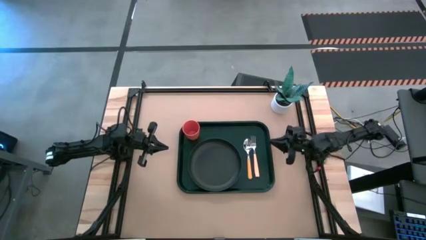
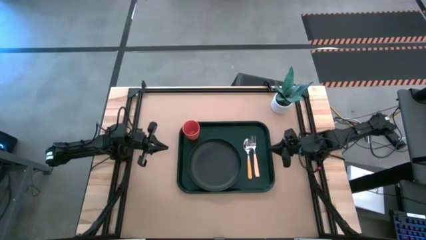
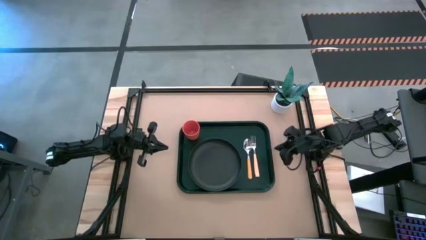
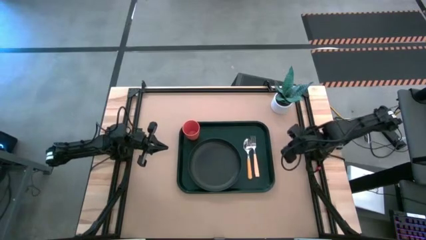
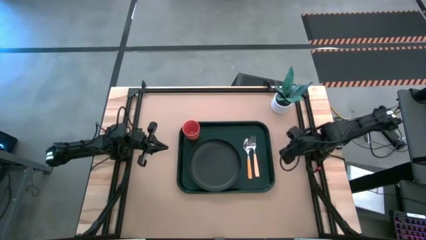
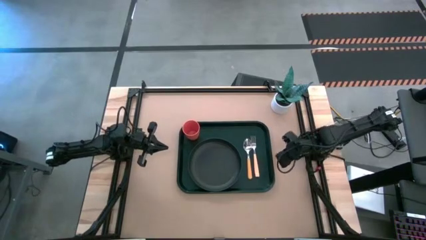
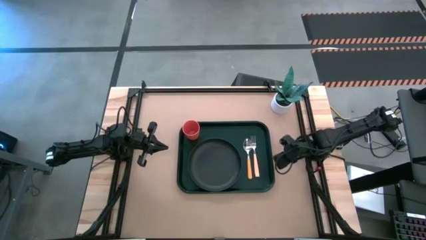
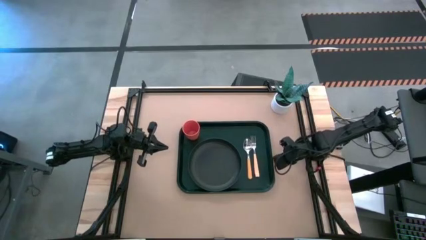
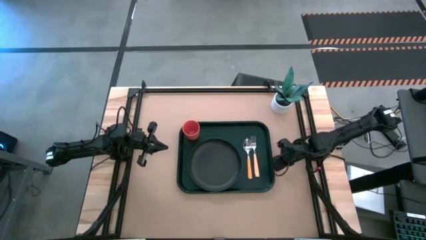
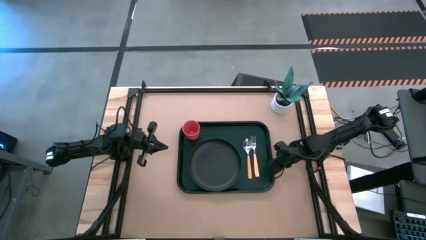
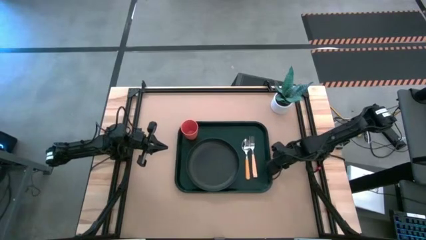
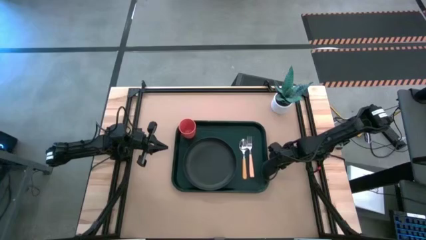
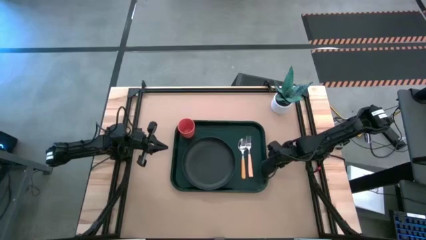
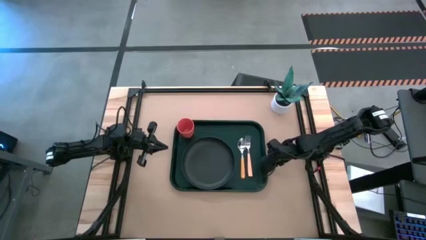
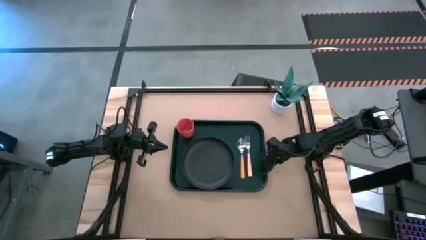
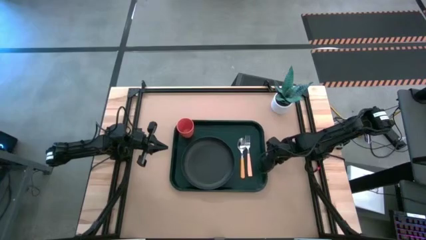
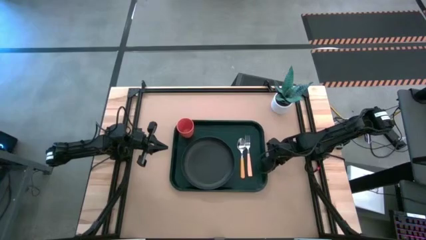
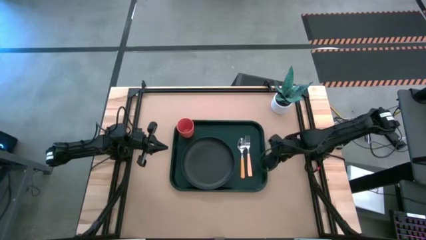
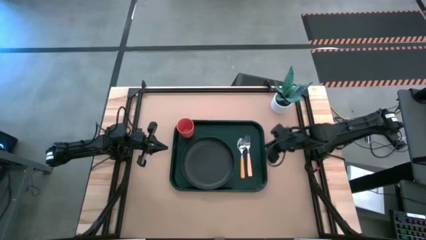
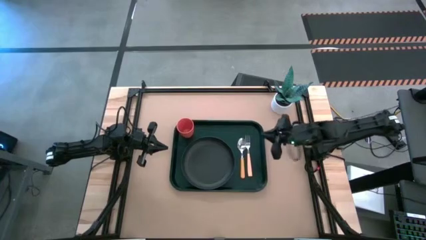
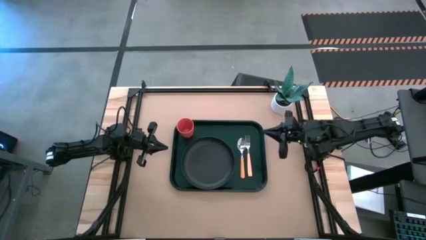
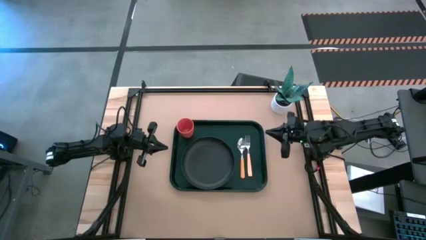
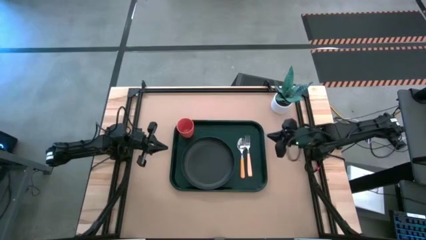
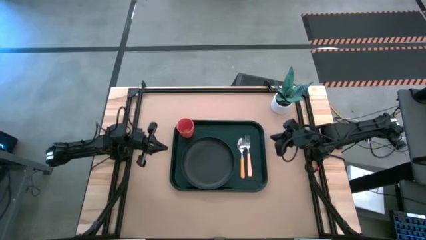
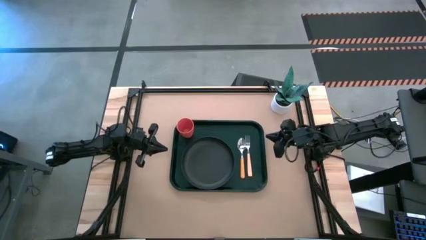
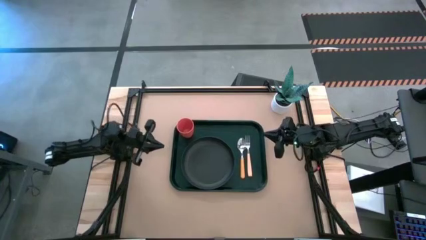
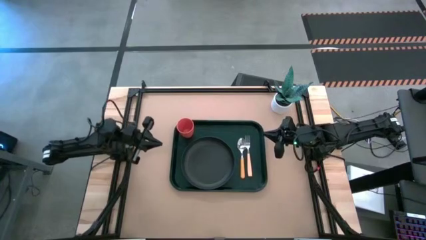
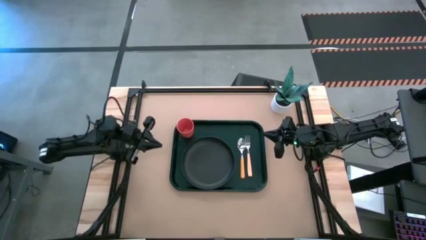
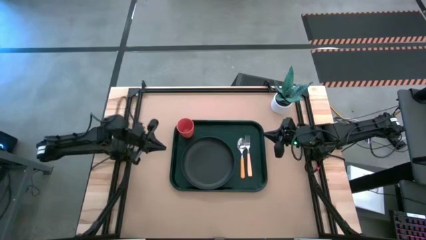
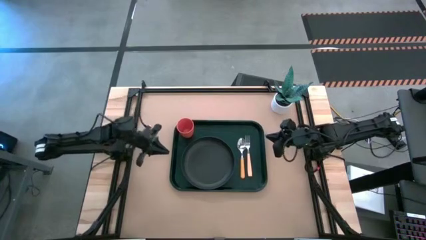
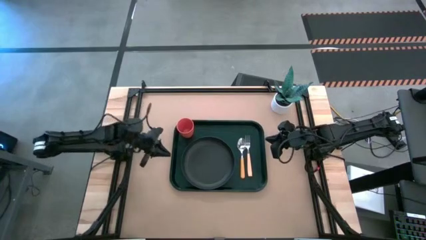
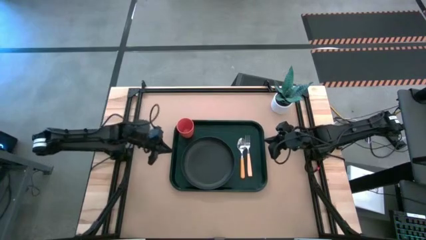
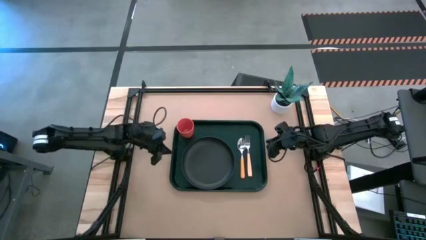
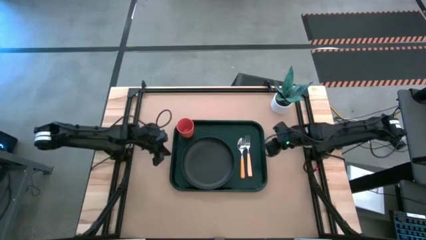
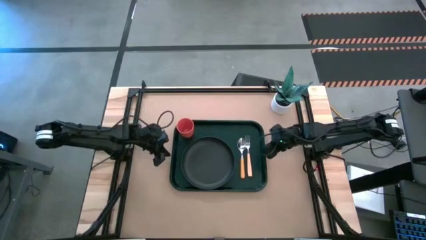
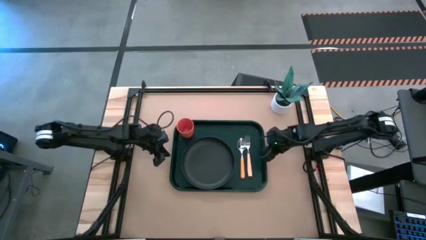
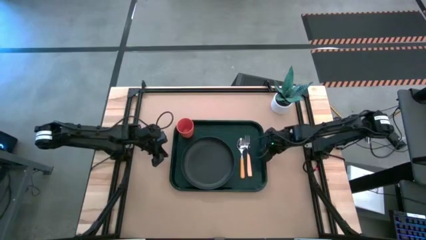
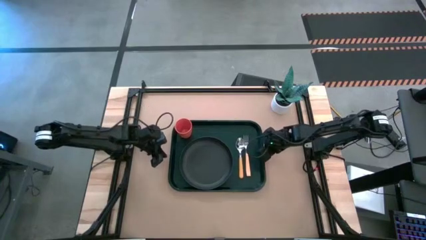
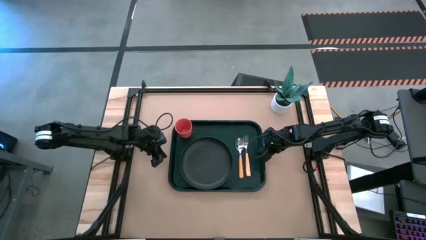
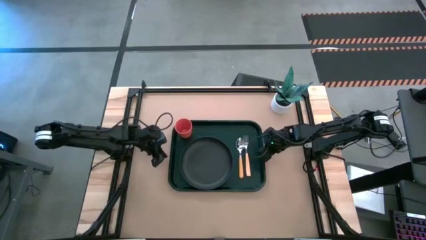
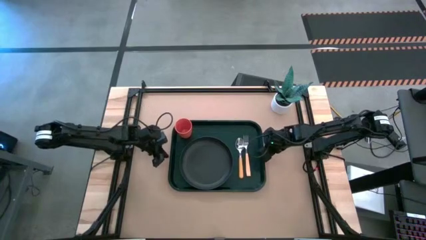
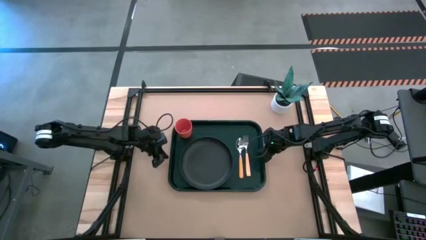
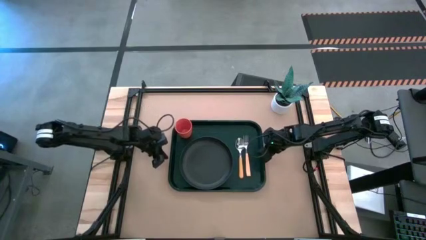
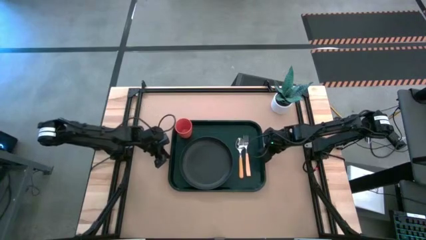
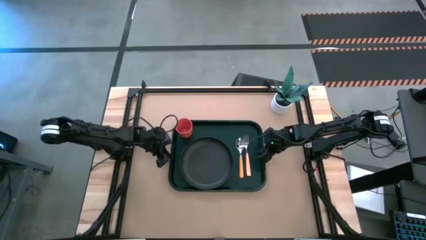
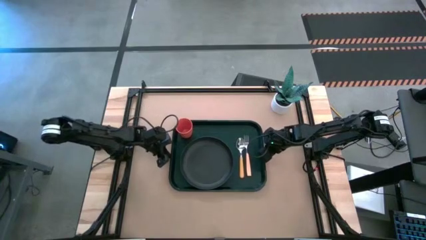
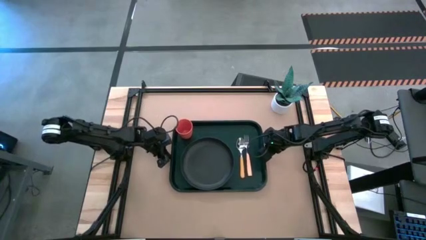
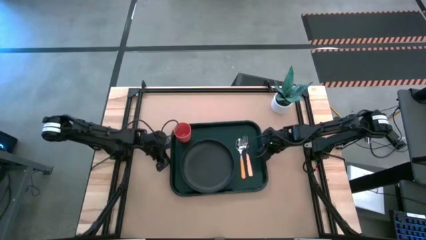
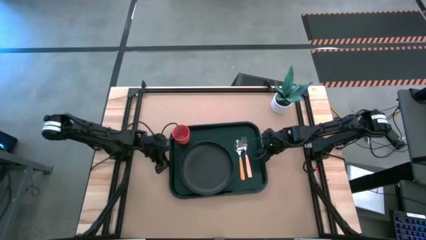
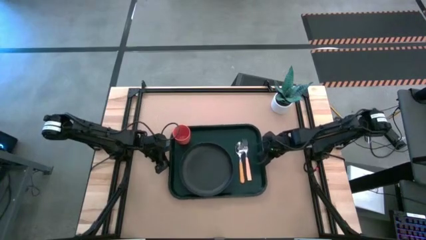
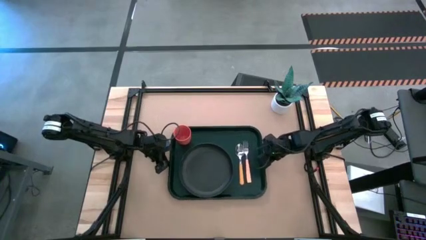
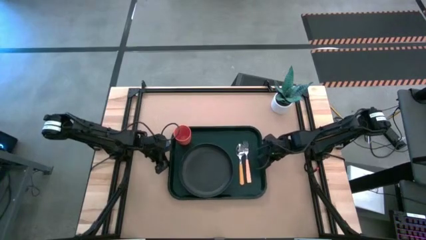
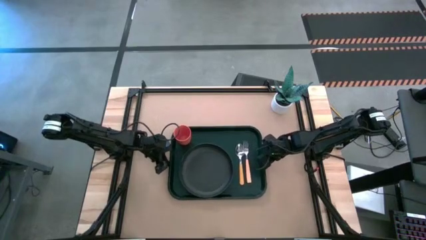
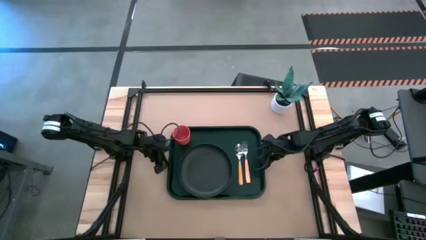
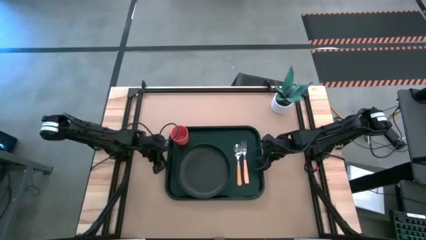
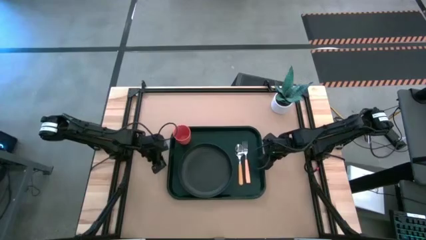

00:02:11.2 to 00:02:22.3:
Task: Pick and place plate/cup/fork/spoon on tray
Adjust the black serving tray

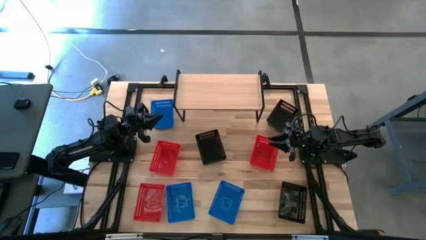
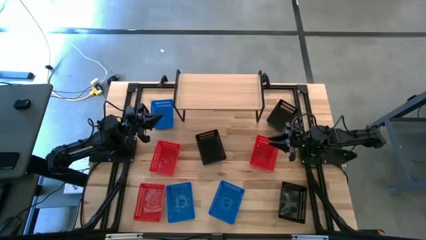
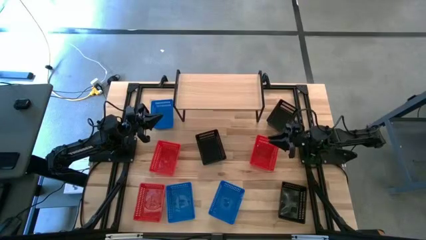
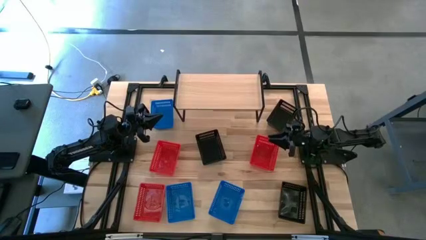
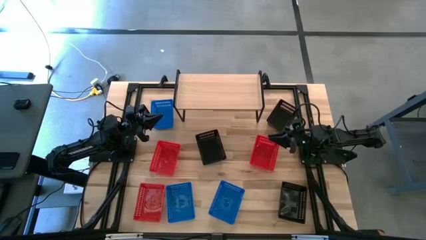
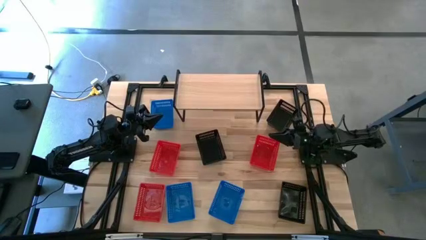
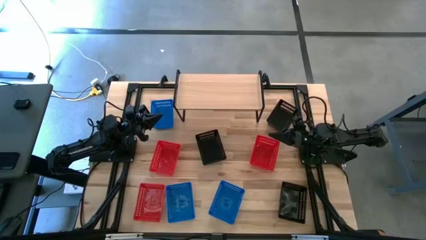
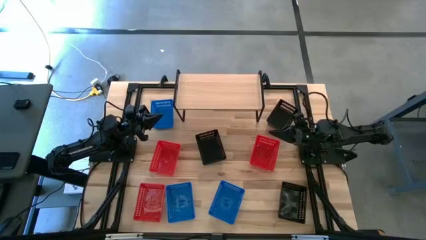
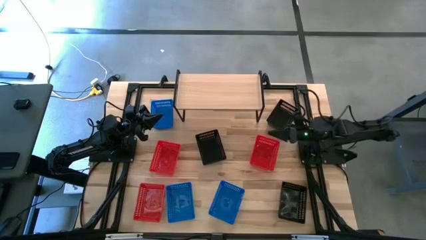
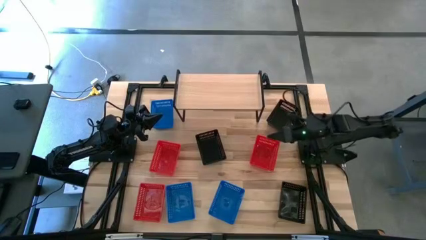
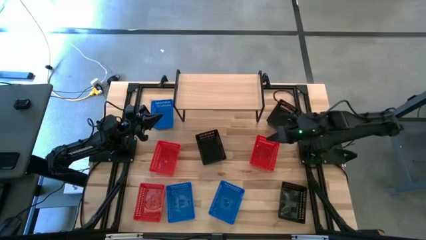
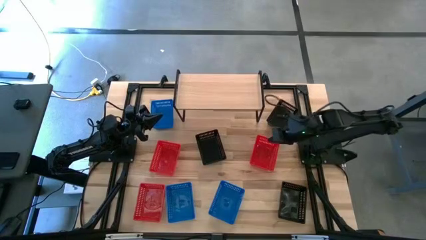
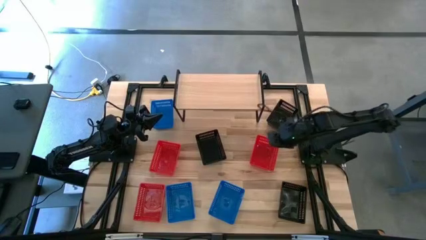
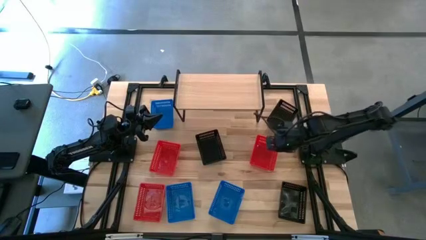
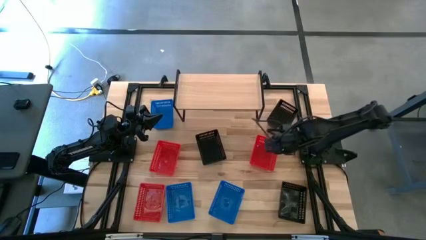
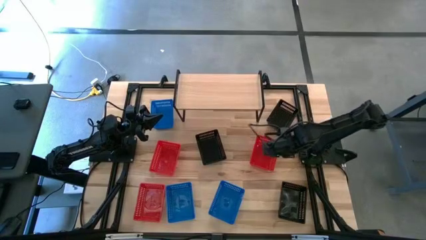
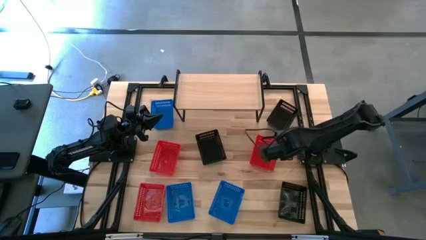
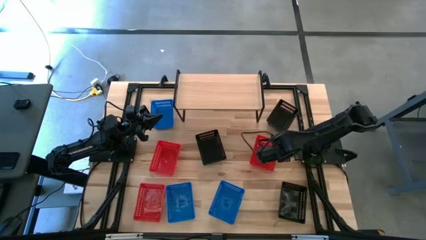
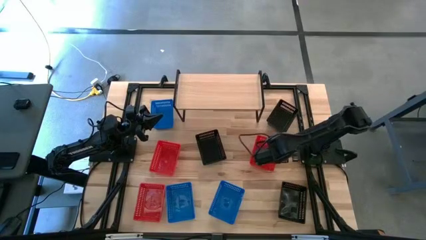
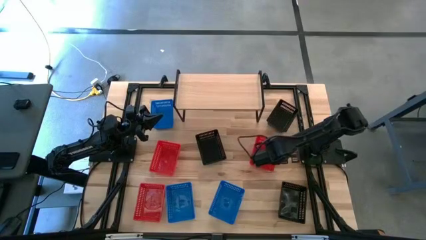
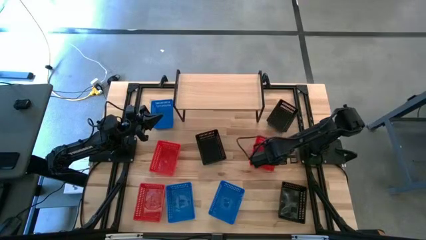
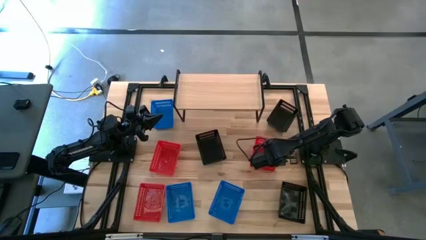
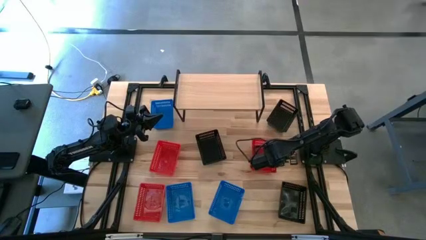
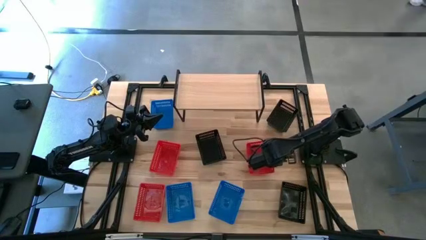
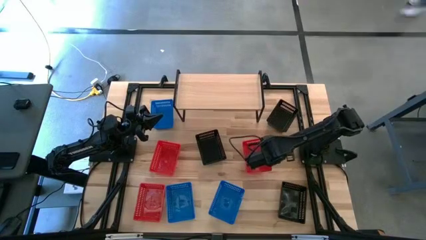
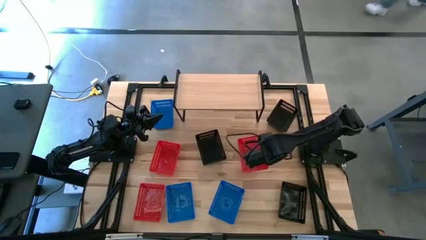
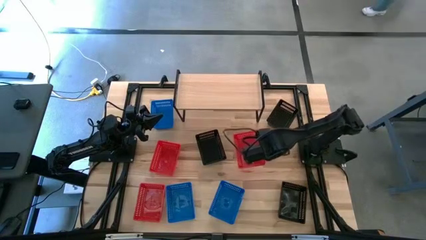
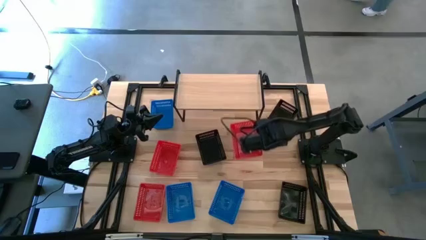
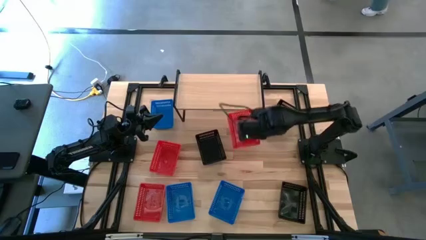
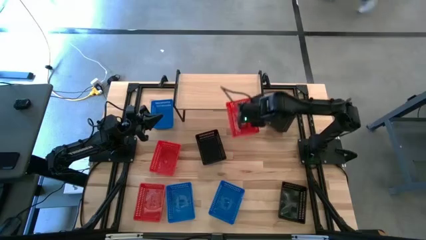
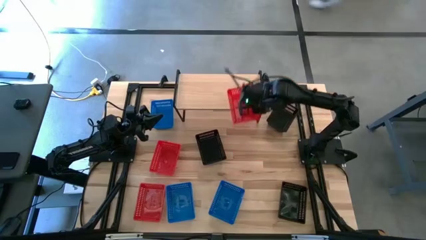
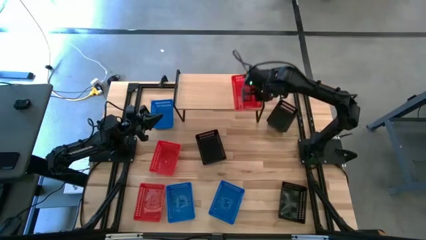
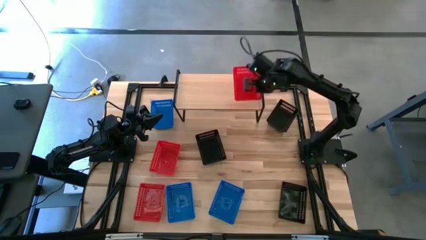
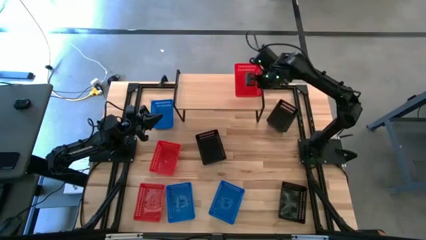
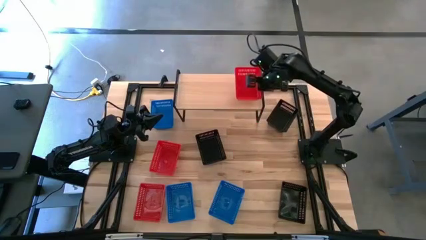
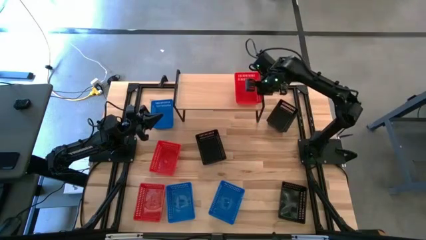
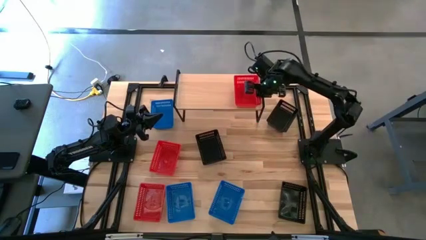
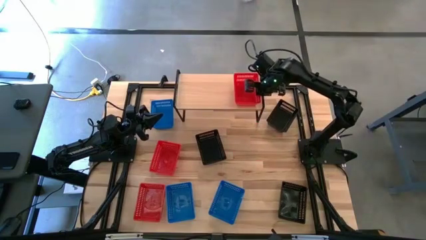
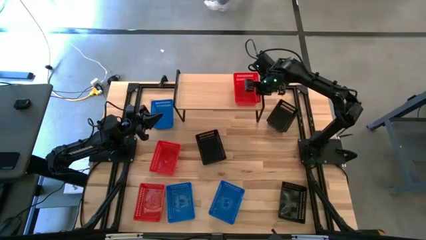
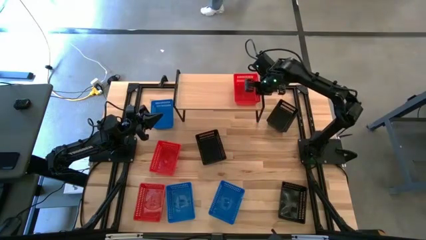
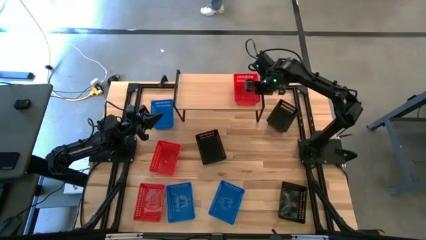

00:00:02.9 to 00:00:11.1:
Task: Stack baskets on shelf by color
Put the right red bin on the shelf
